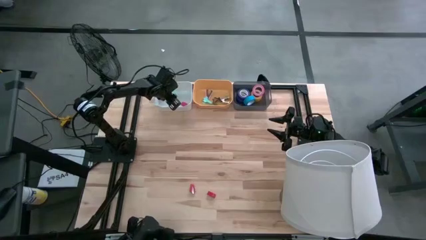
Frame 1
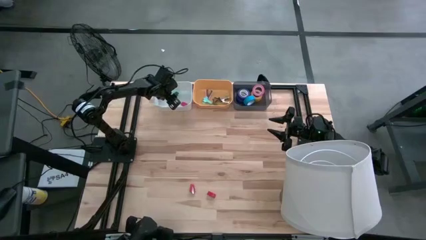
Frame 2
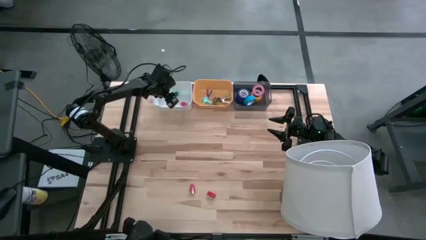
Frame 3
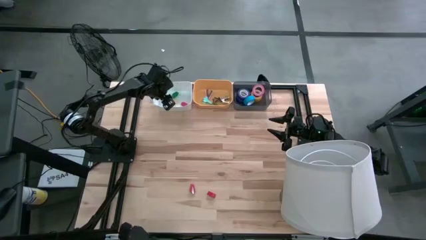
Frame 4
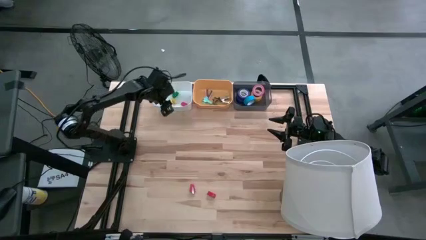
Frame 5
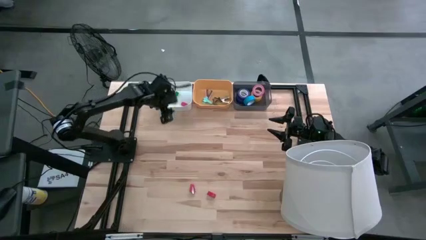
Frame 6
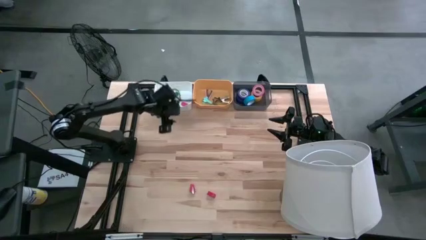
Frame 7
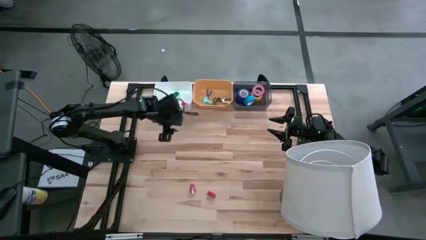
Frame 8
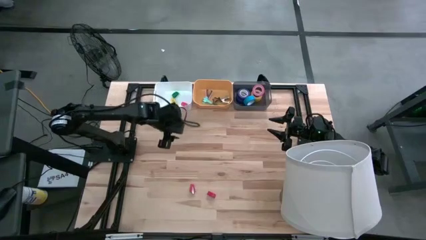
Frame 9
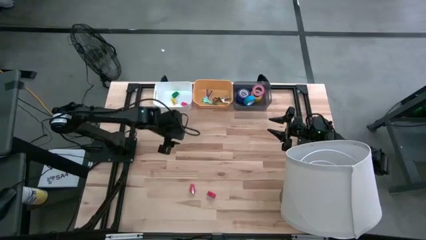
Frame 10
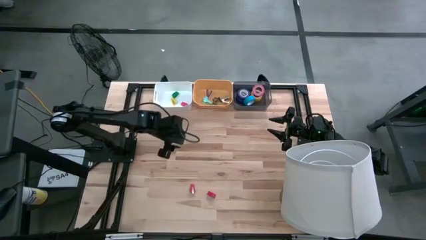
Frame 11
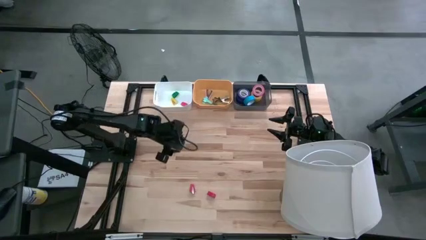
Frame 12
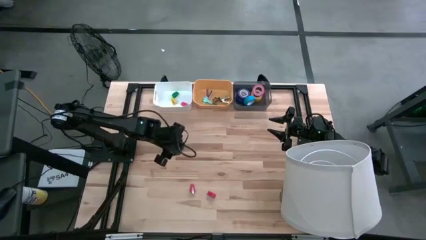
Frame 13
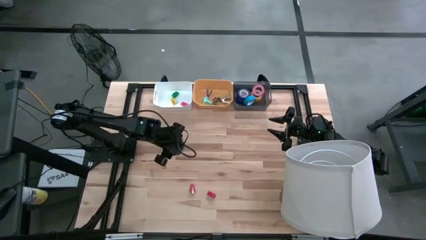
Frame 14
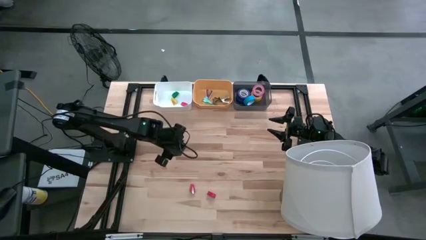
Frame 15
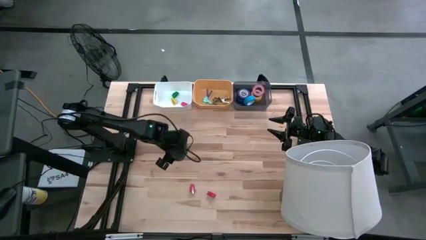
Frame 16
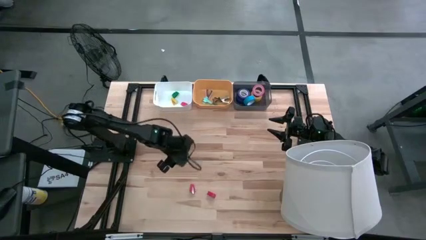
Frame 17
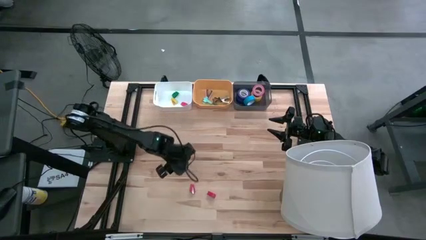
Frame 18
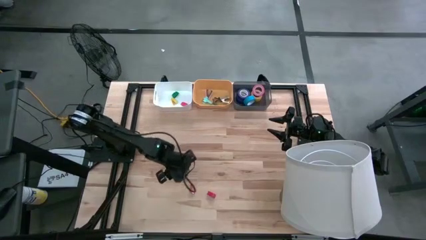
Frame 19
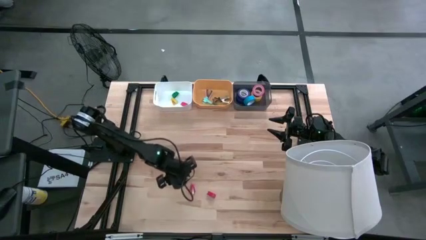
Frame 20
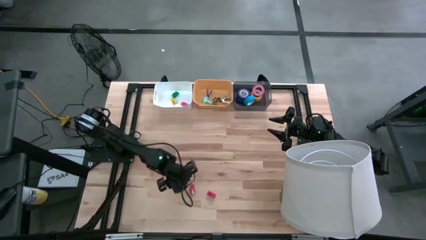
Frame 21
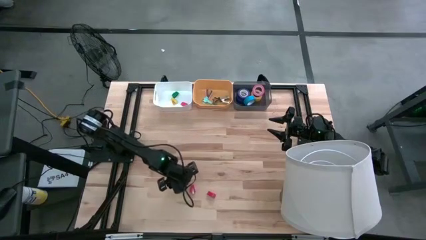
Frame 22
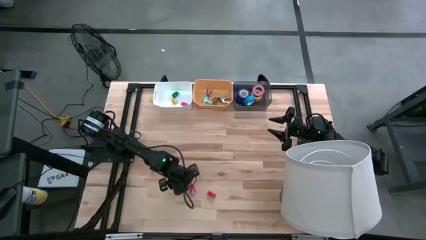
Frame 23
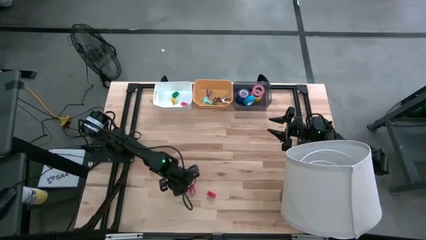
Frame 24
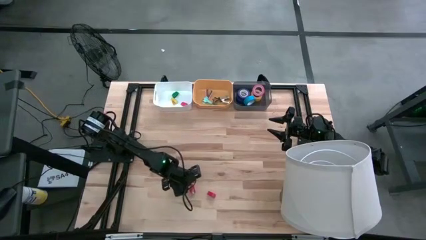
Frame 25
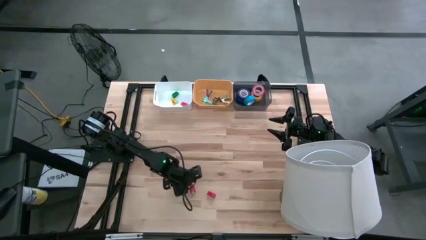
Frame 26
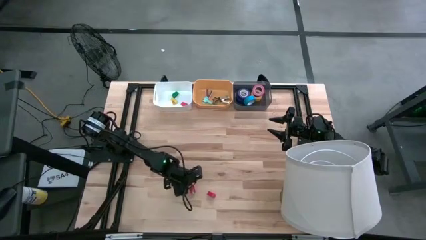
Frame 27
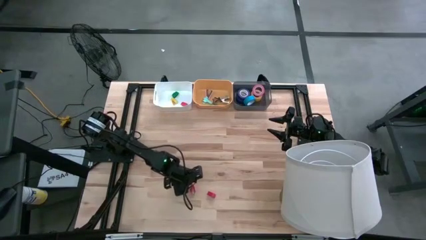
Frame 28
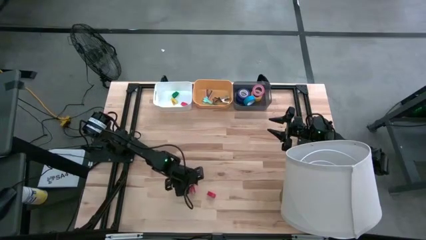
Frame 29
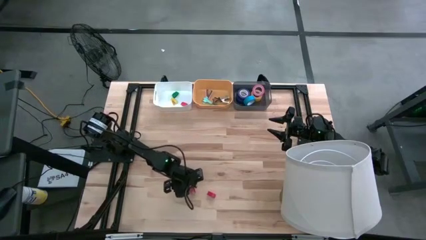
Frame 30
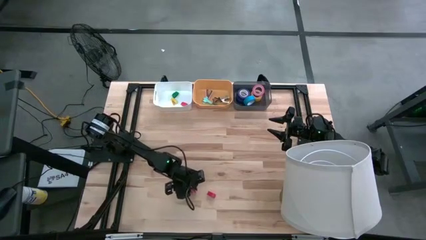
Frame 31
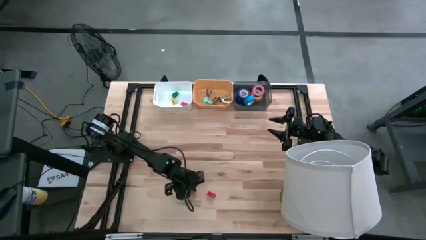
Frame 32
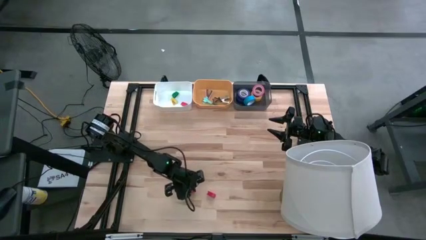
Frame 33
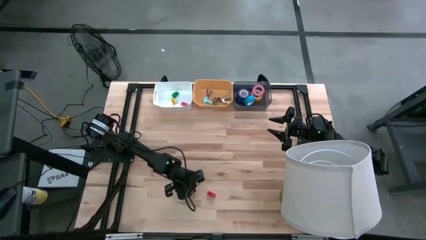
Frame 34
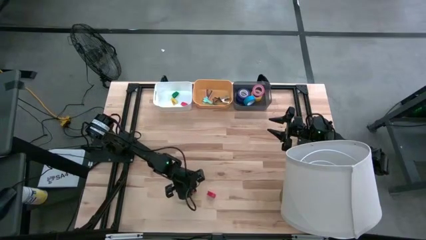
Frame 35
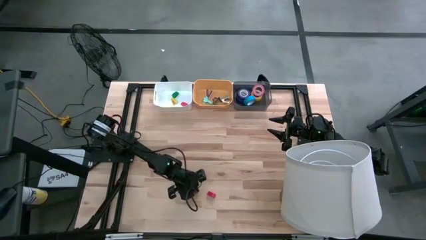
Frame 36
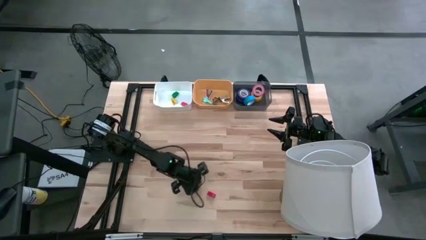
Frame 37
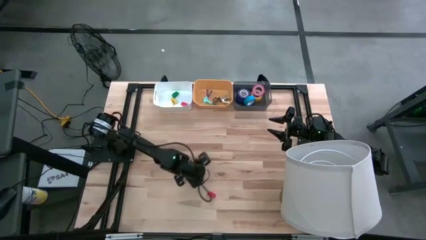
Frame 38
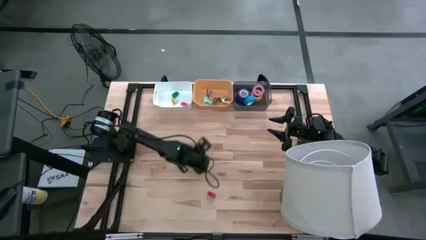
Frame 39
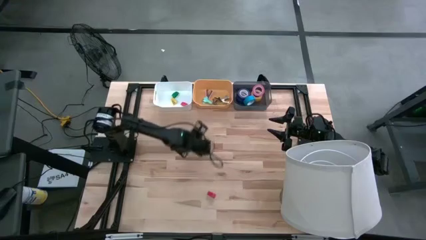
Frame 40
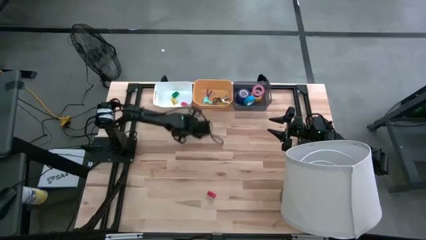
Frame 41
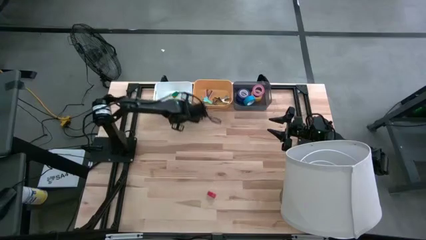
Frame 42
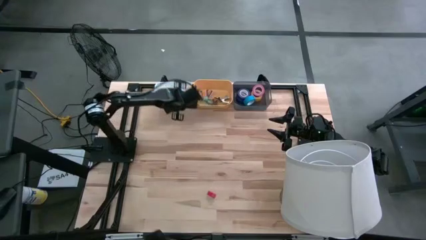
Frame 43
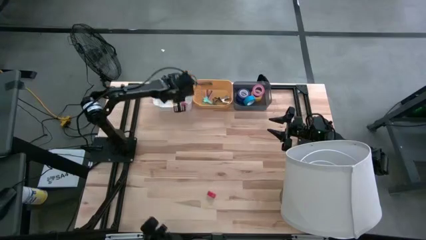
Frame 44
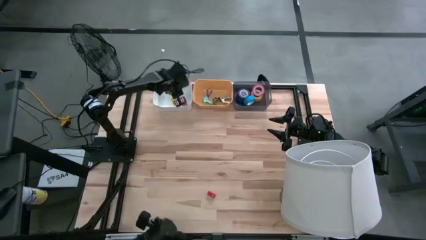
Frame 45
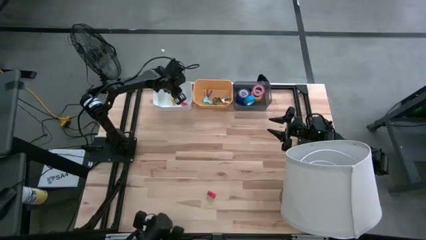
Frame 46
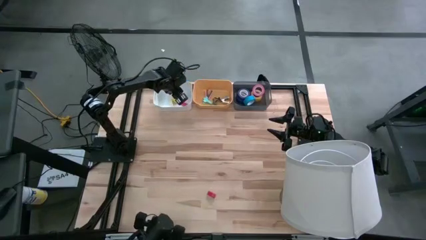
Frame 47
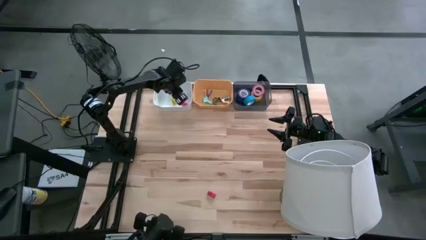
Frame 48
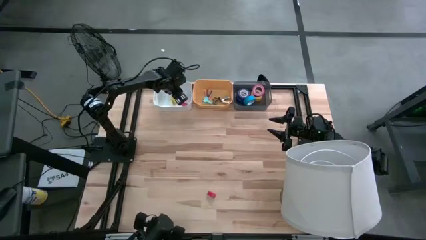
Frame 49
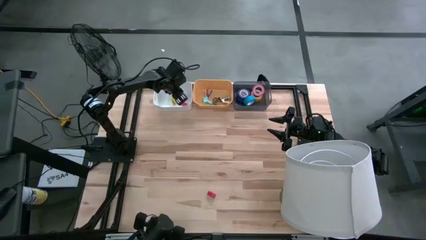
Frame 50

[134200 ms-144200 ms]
Task: Pick and place Stapler, Stapler remover, tape
Put the left red stapler into the white bin

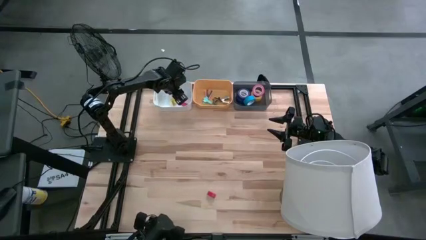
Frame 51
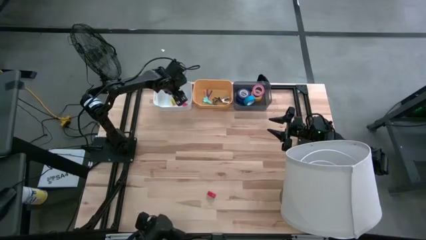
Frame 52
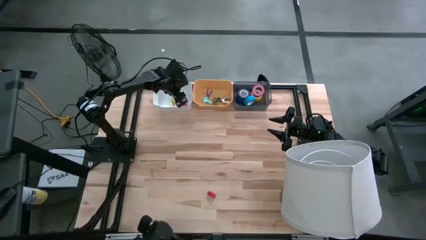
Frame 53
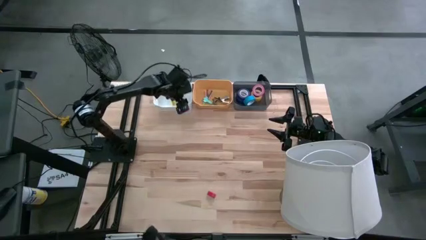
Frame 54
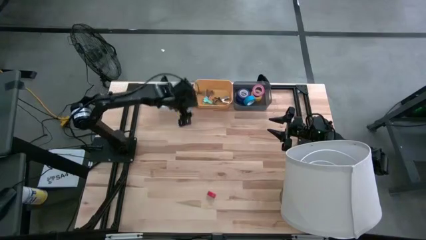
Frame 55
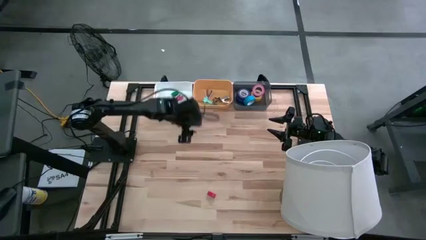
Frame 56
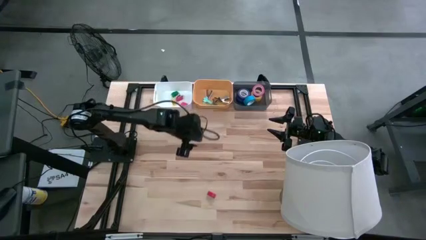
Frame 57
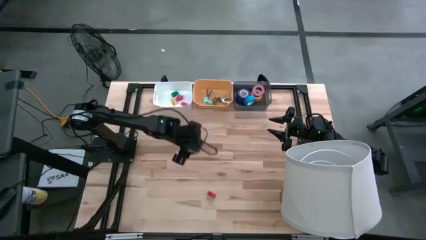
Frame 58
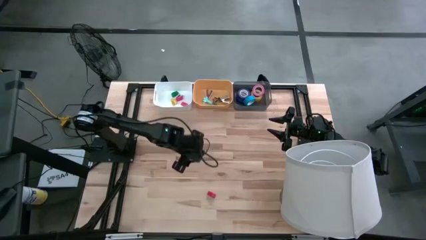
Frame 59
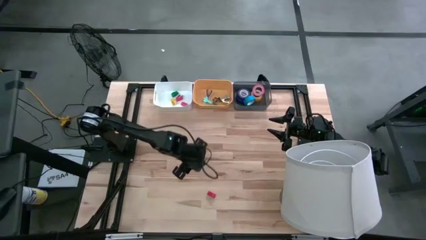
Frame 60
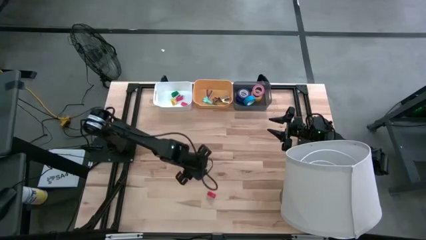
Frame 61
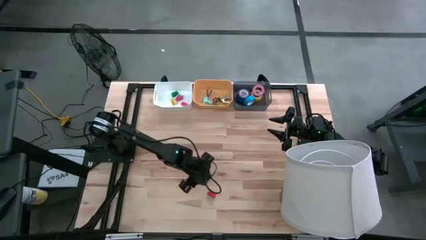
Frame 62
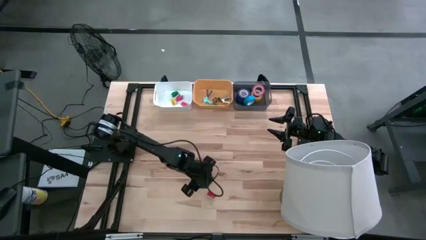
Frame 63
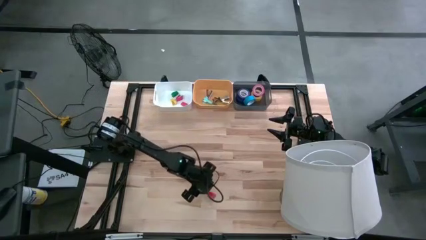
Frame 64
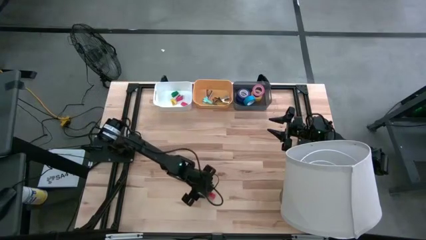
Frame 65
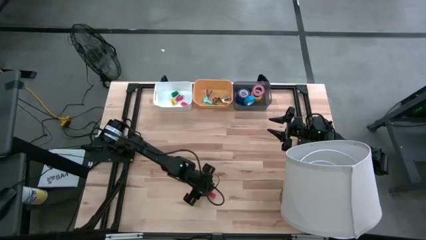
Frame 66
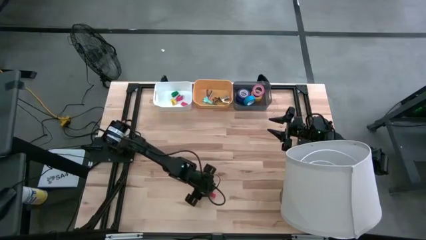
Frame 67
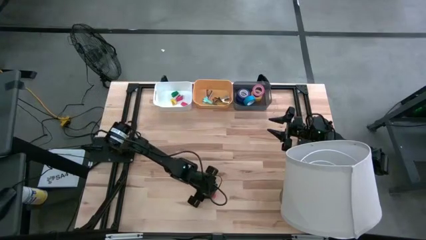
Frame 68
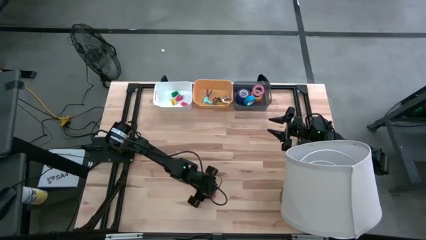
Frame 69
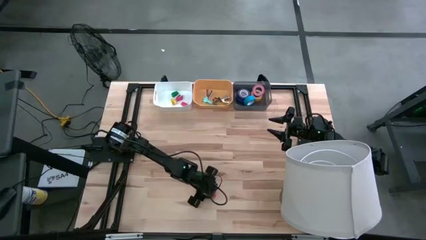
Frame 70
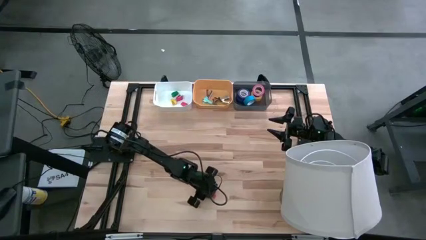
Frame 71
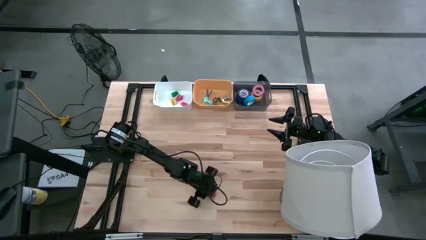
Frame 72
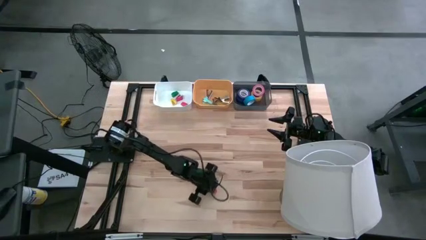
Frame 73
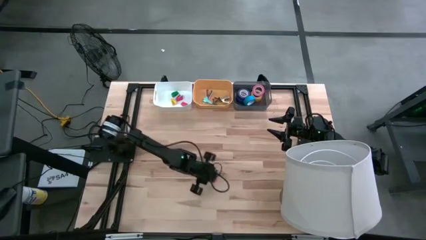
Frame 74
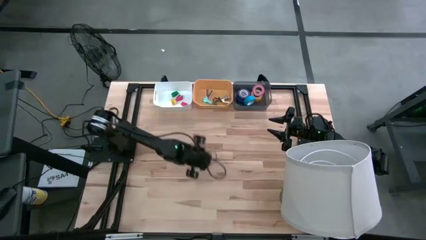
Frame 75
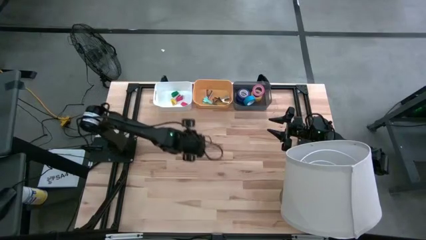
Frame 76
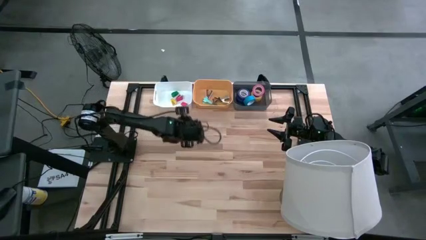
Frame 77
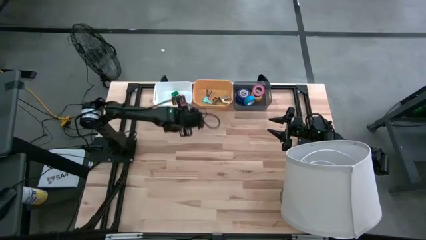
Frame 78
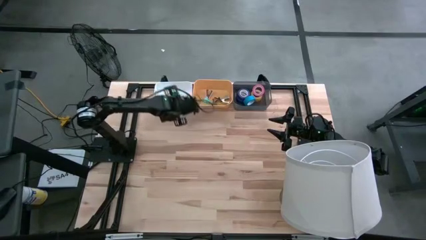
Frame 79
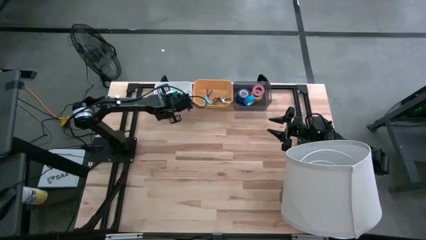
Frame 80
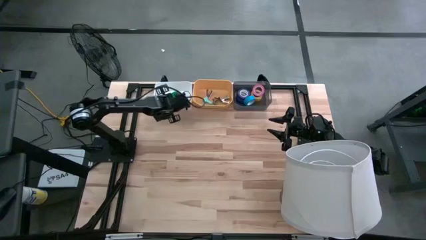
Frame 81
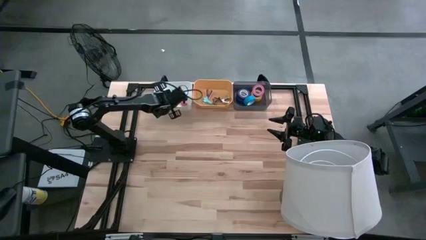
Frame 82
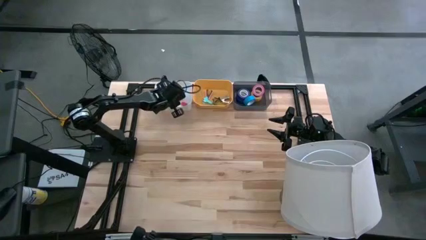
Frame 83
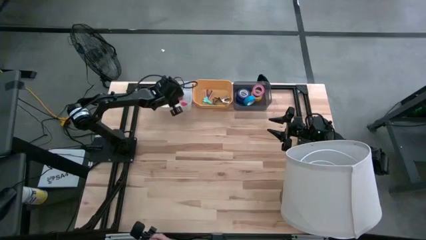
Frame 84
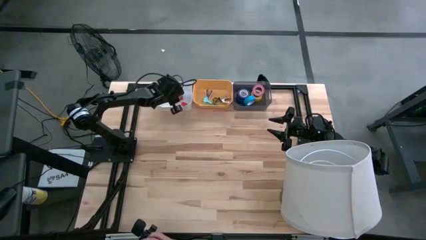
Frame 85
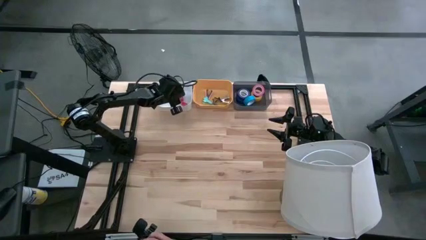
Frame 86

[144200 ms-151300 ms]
Put the red stapler into the white bin

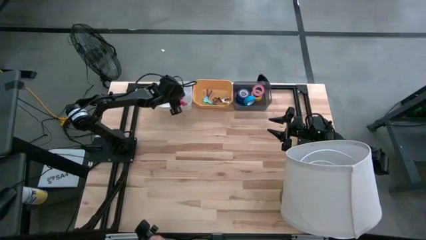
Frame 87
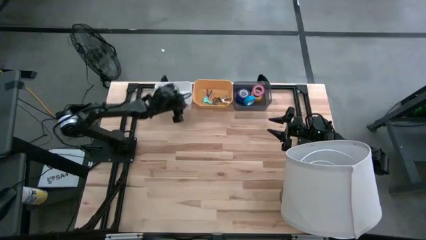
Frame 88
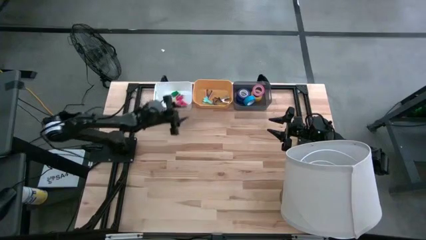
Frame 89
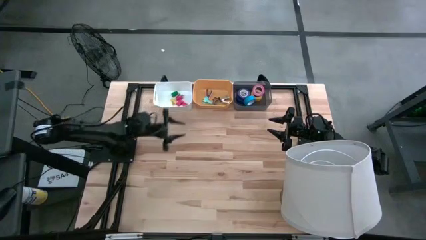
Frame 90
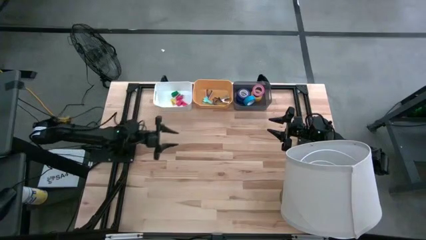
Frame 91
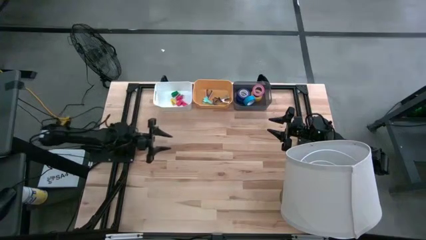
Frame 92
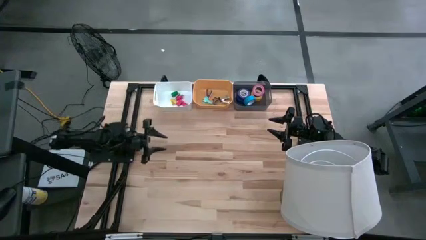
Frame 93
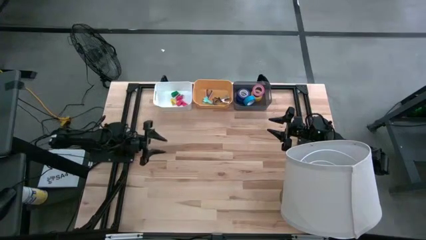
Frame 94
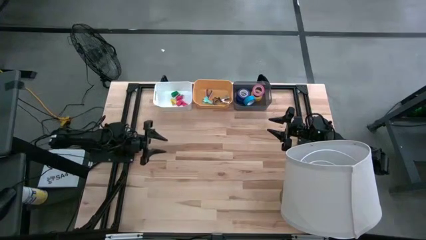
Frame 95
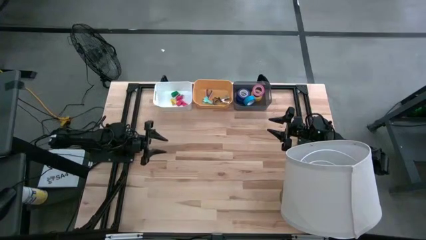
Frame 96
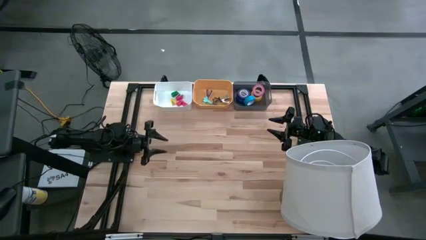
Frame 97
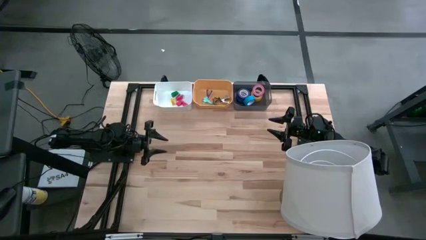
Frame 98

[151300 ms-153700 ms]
Return to Home Position
